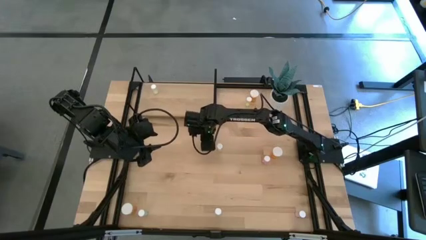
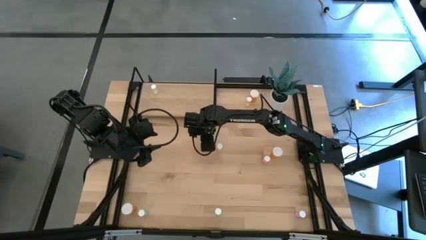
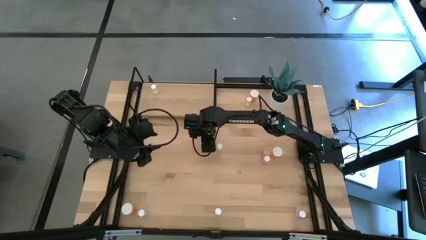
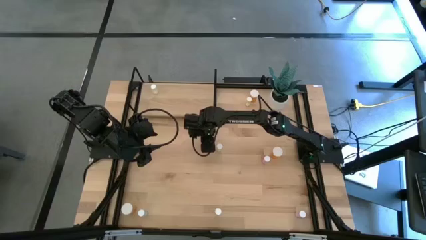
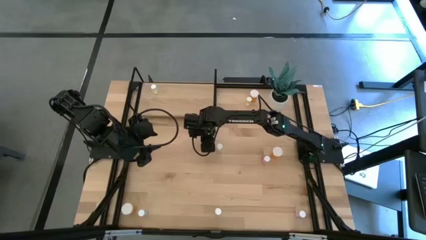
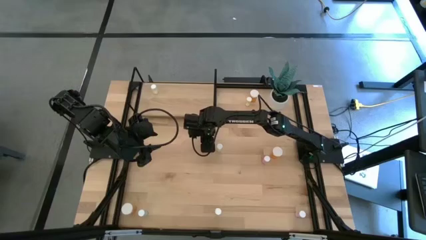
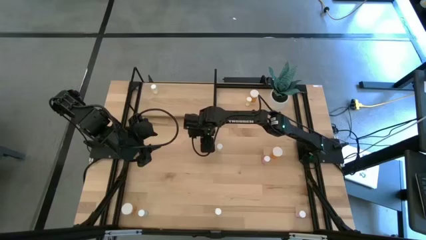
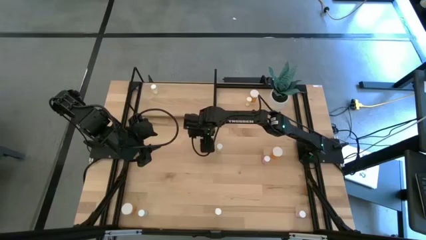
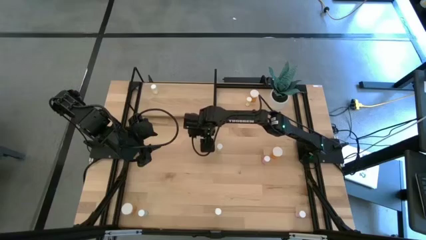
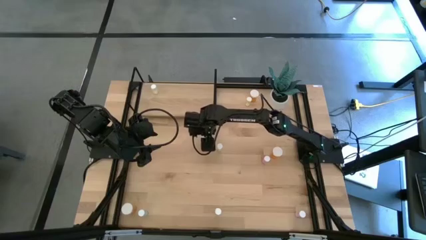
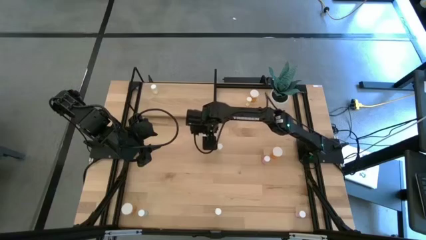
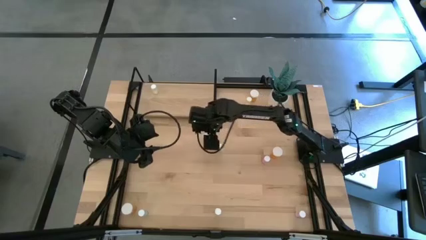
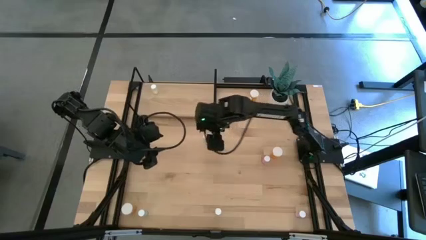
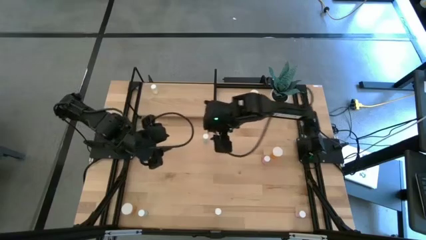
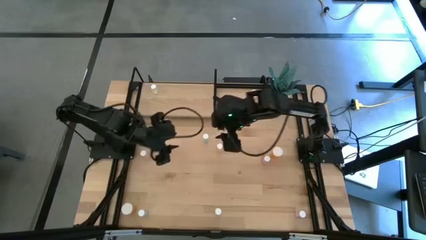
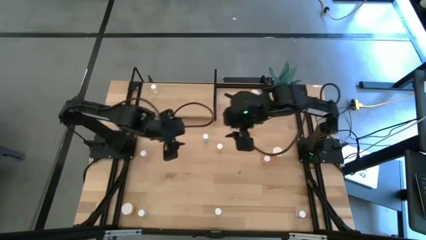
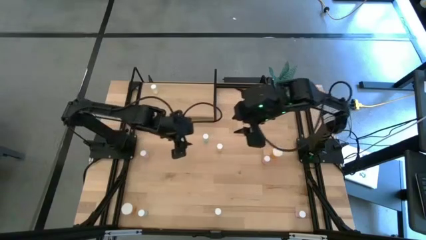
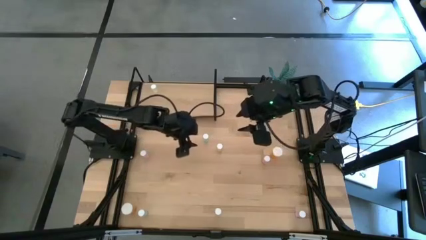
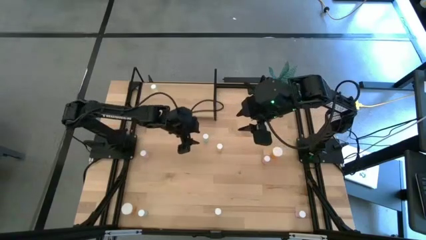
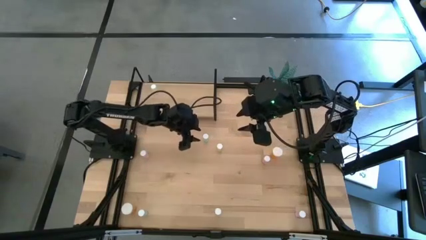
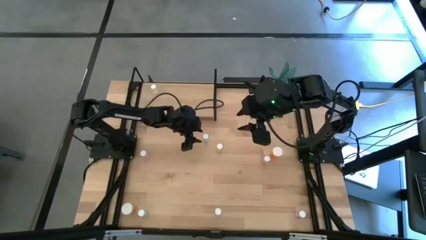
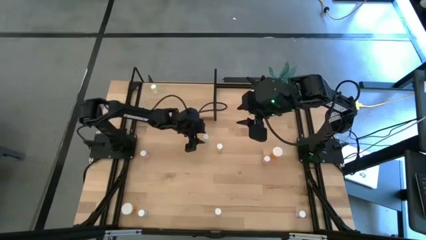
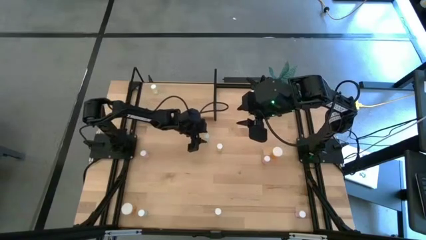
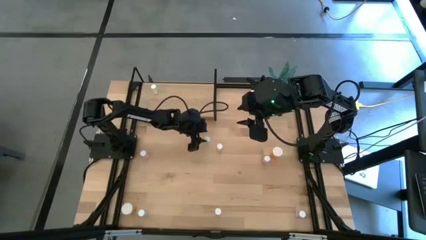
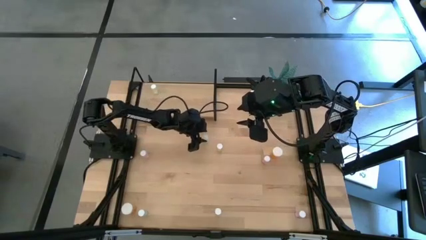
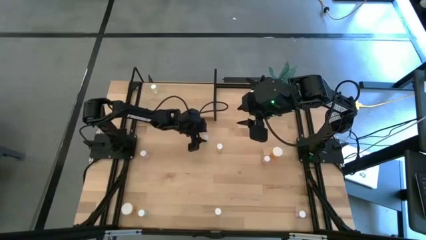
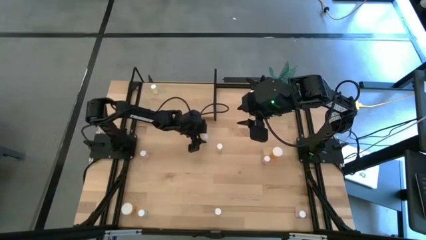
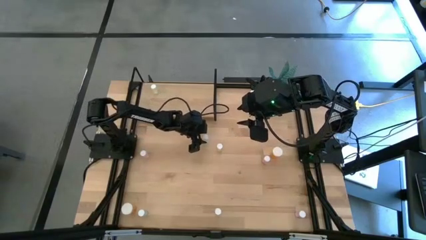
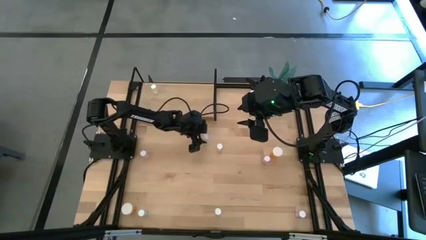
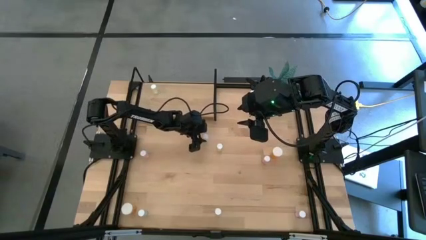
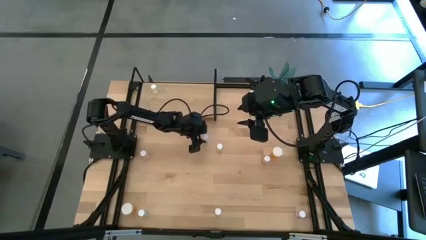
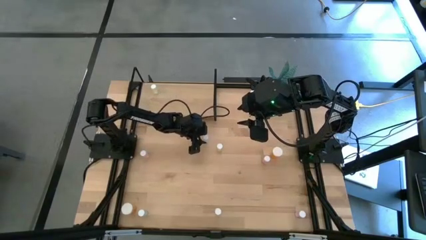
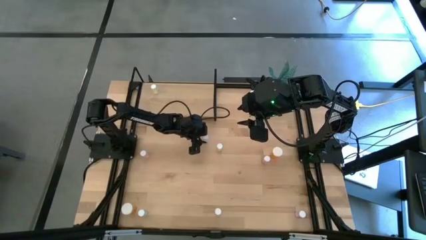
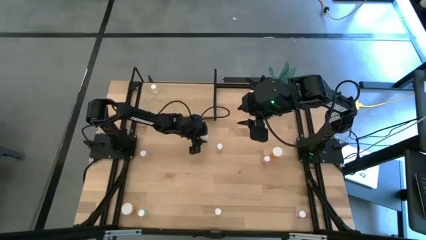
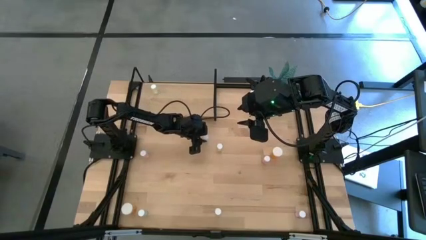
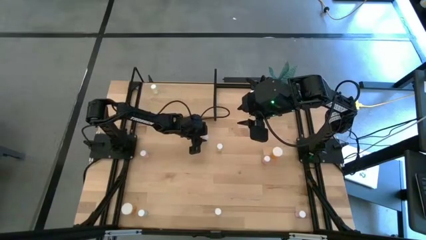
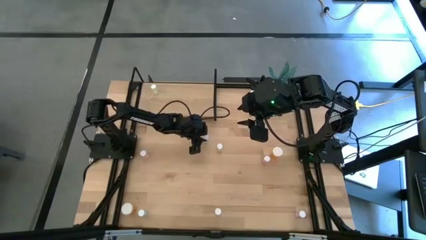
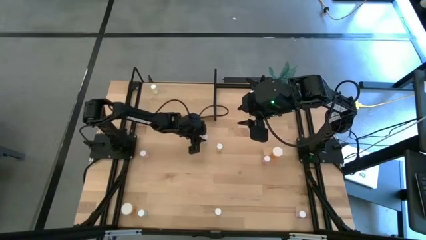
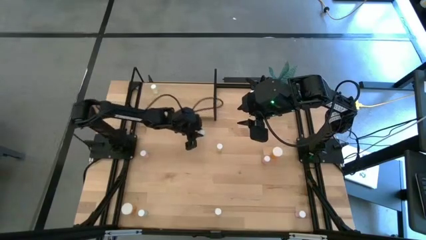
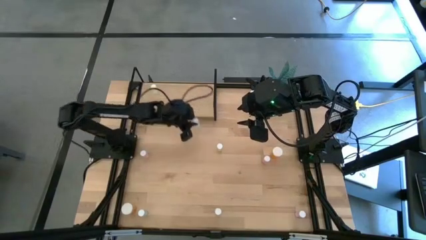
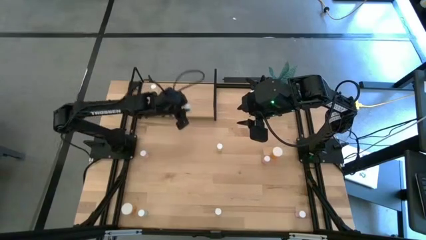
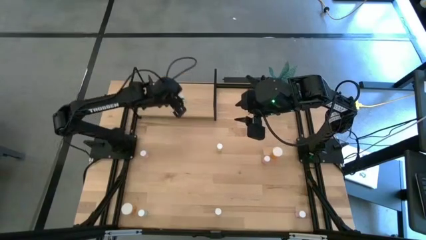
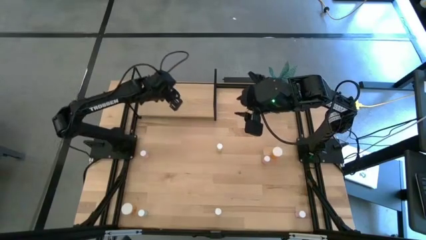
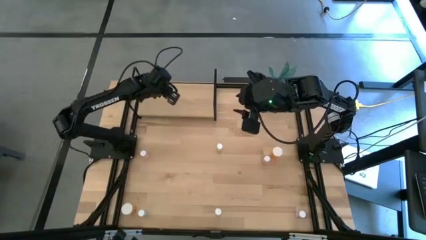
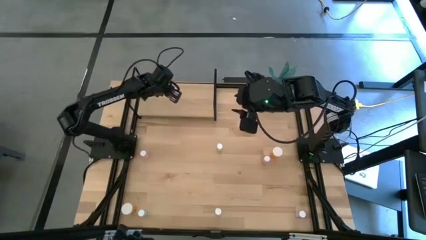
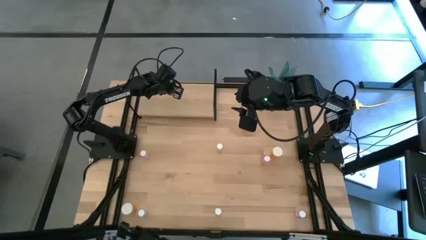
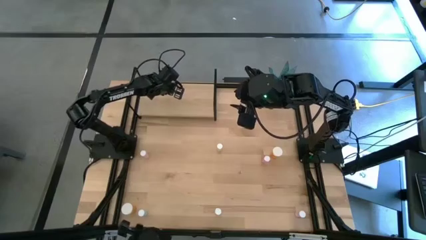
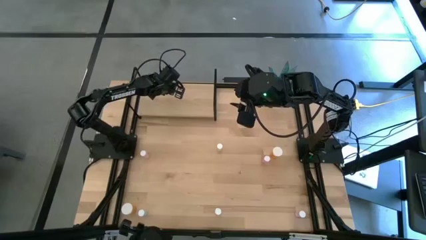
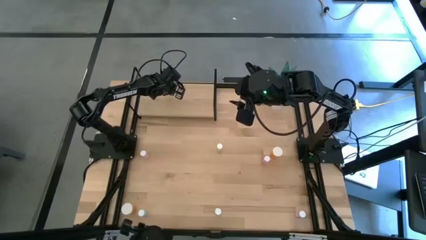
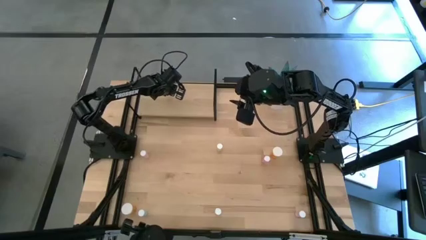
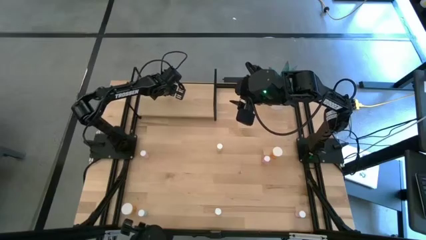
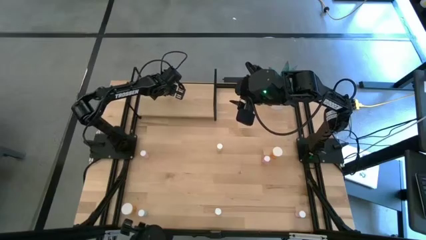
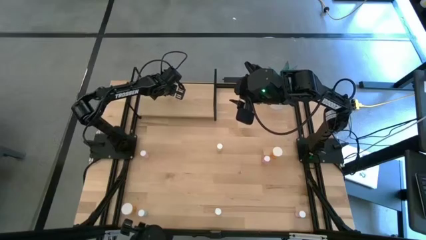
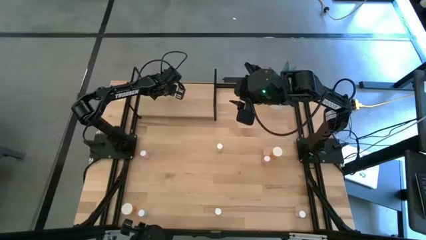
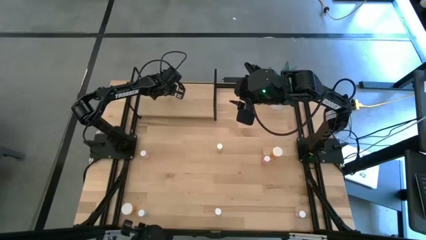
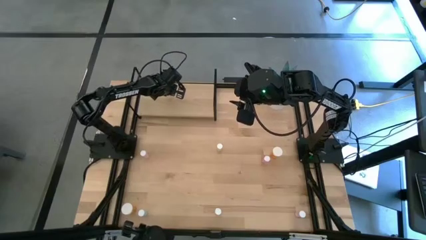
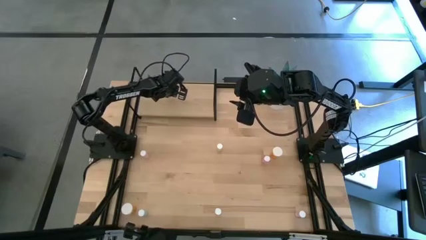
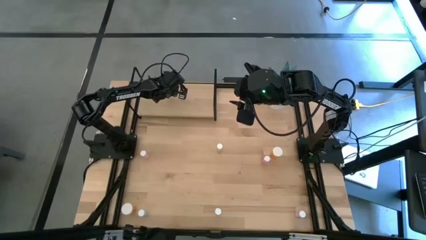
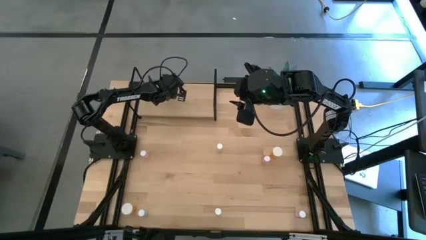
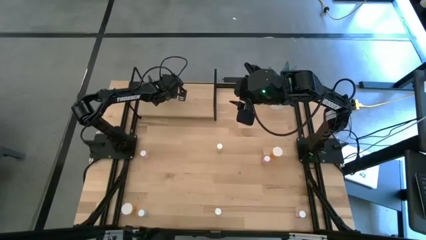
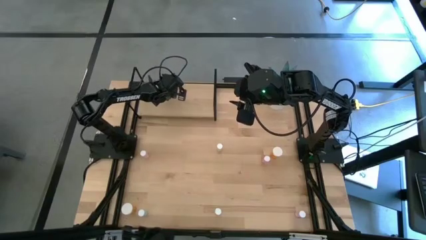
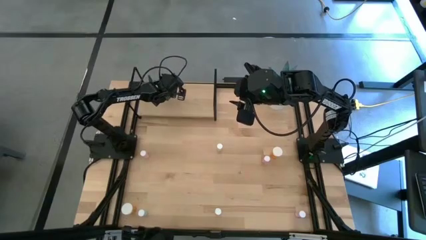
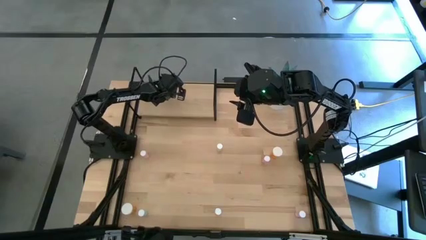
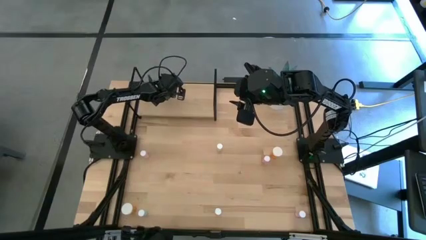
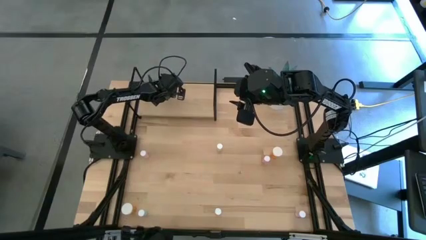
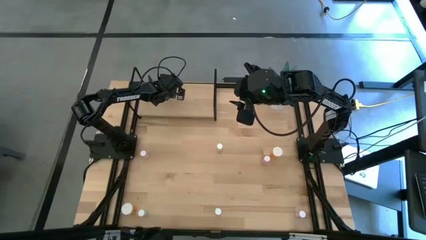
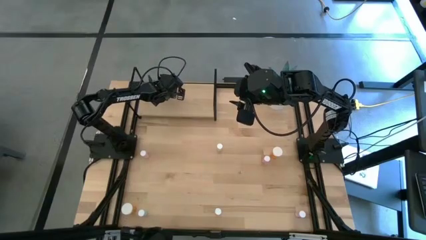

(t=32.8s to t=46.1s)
Task: Pick and place medicine bottles onto shelf by color
Put the top green pill bottle on the shelf

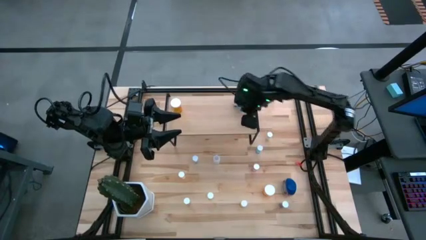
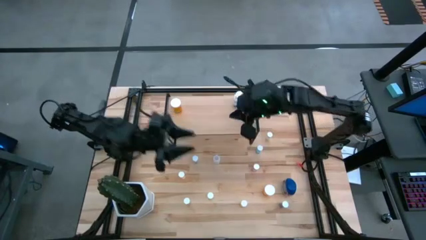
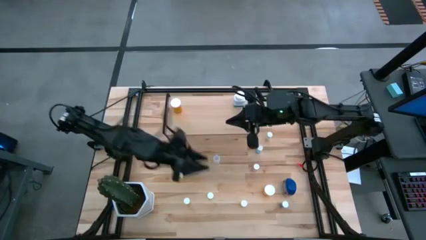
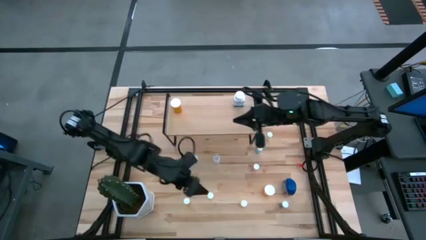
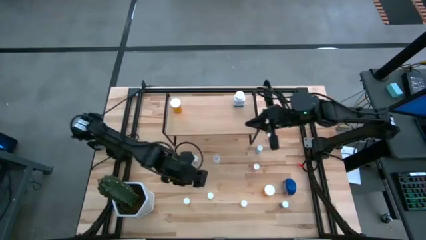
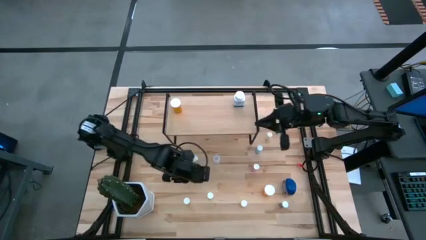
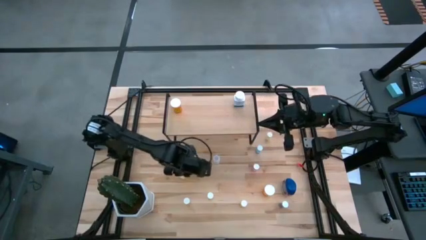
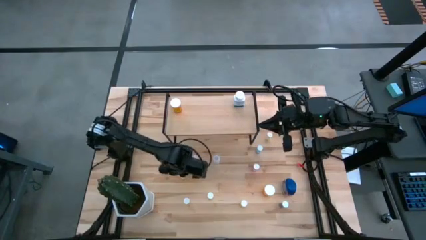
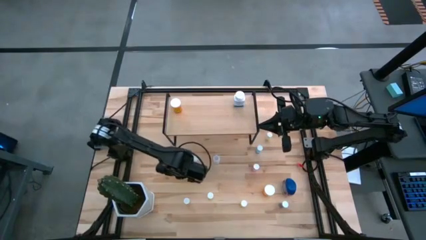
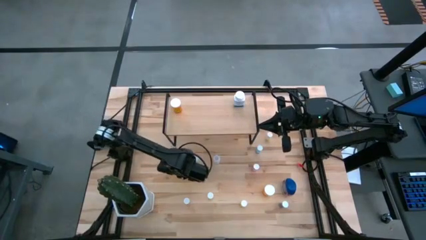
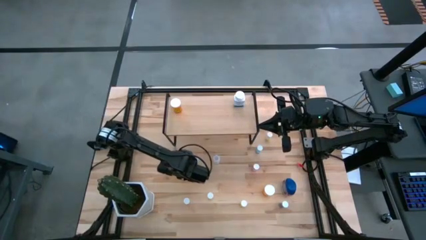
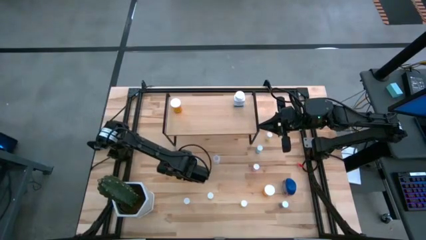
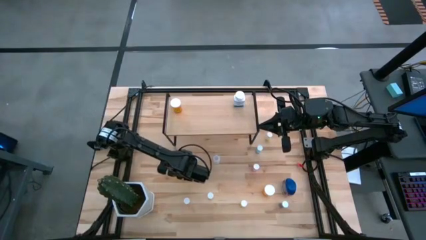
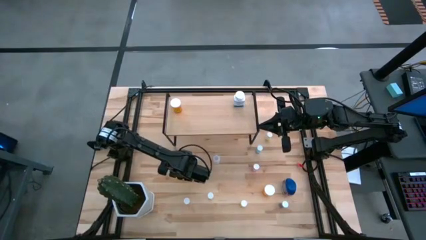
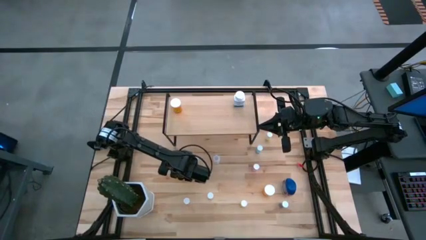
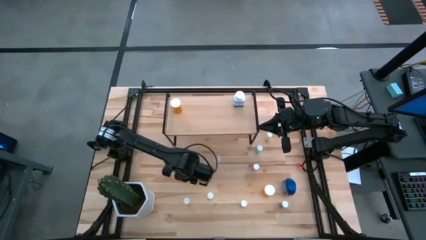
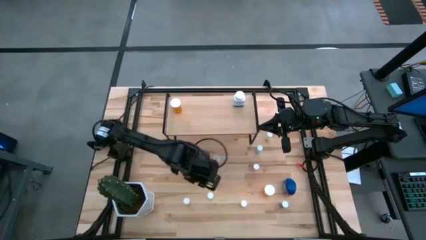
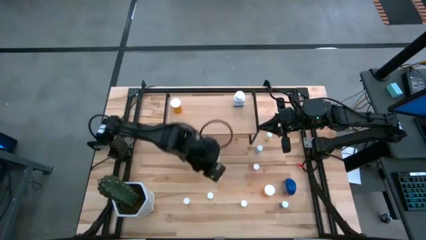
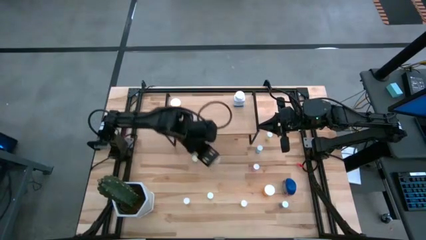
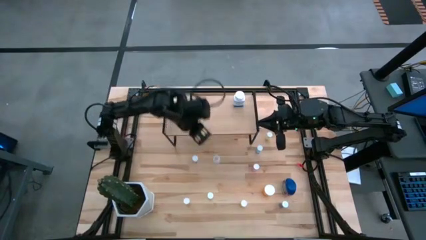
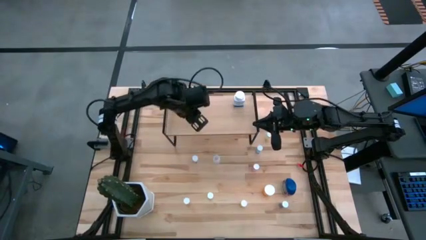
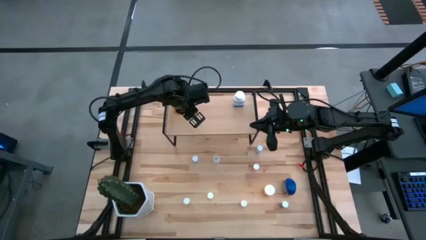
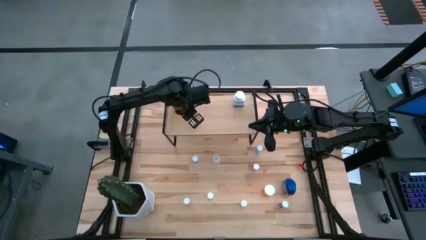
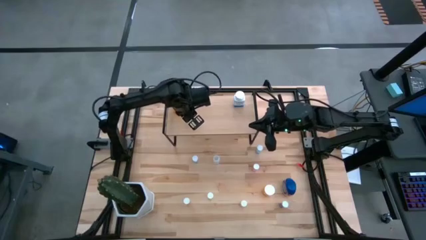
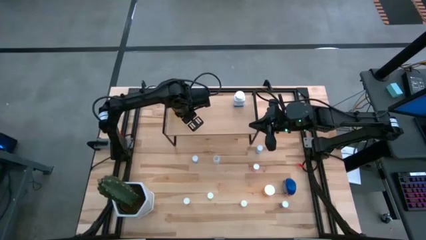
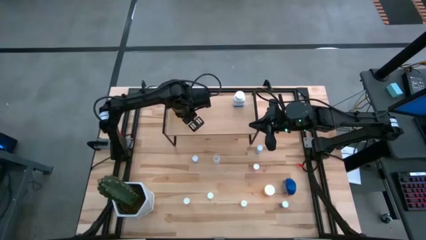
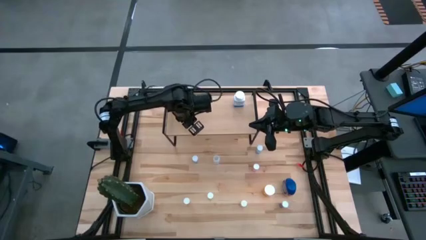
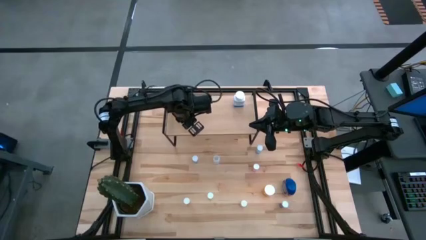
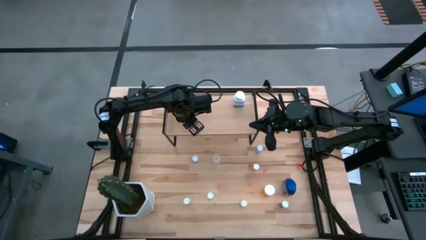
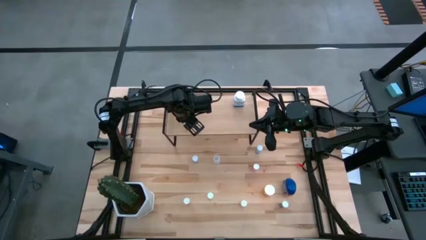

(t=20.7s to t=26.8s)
Task: Pick and place medicine bottles onto shelf by color
Put the yellow pill bottle on the shelf
